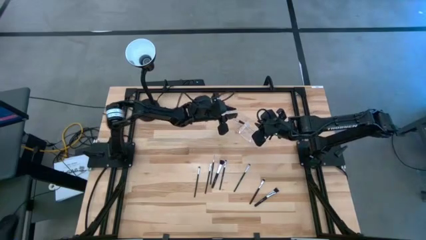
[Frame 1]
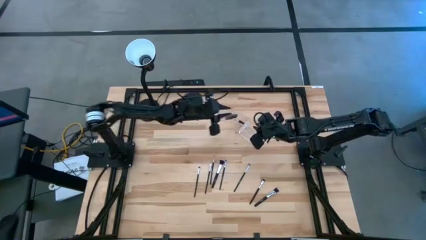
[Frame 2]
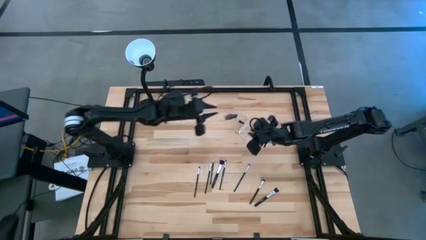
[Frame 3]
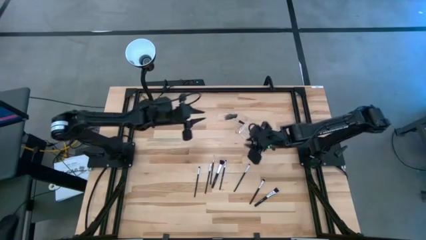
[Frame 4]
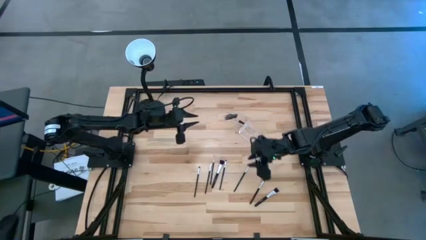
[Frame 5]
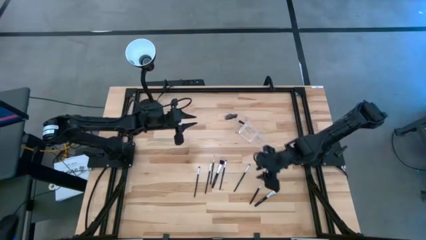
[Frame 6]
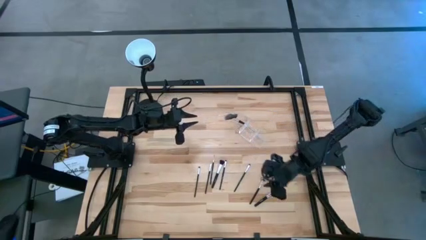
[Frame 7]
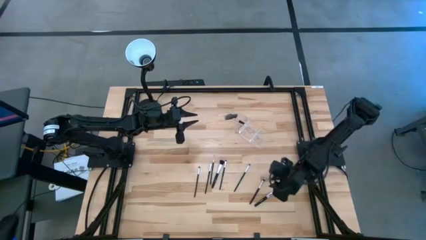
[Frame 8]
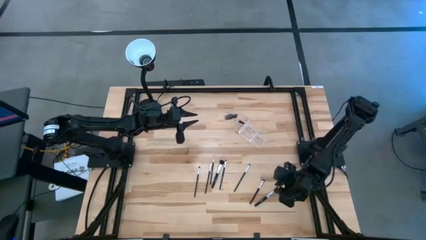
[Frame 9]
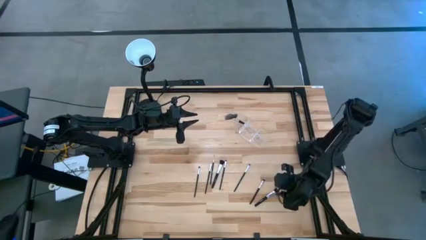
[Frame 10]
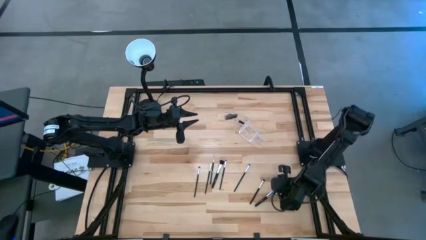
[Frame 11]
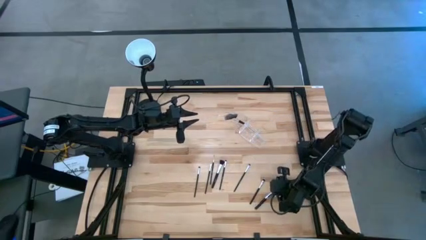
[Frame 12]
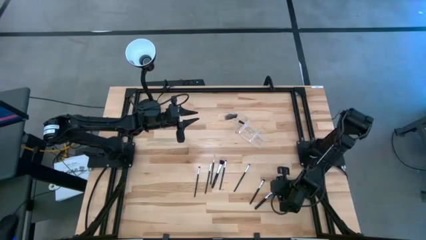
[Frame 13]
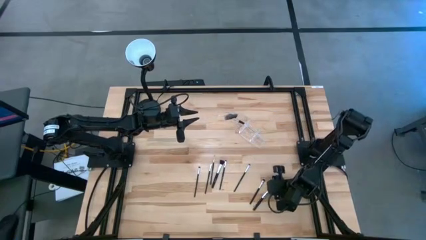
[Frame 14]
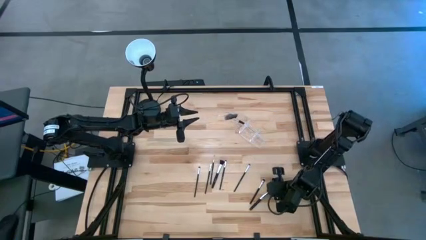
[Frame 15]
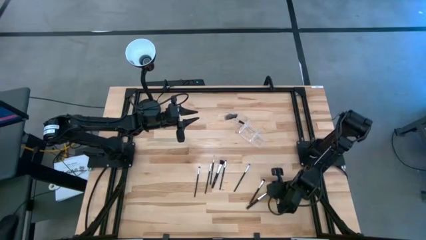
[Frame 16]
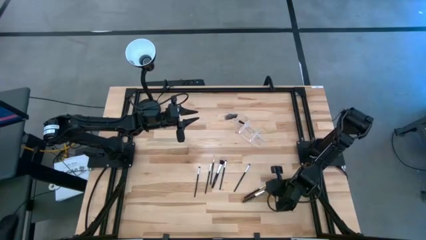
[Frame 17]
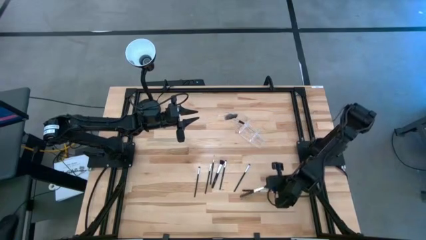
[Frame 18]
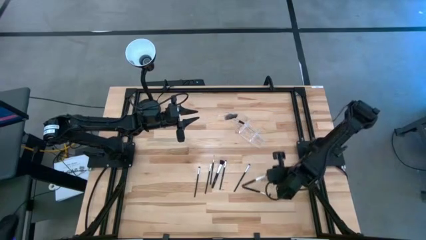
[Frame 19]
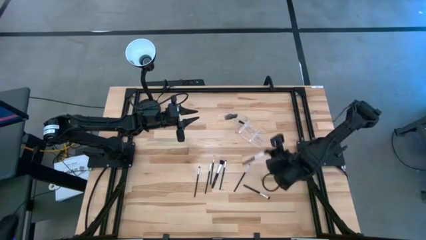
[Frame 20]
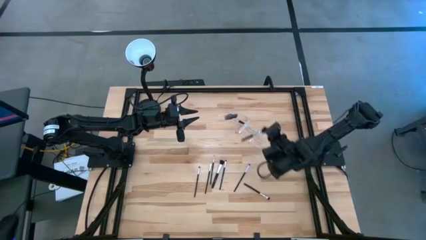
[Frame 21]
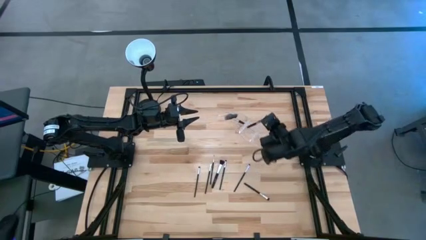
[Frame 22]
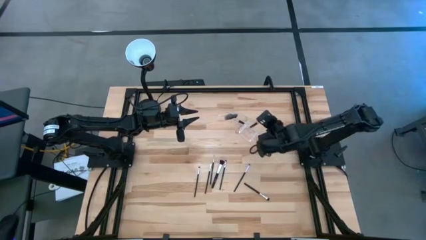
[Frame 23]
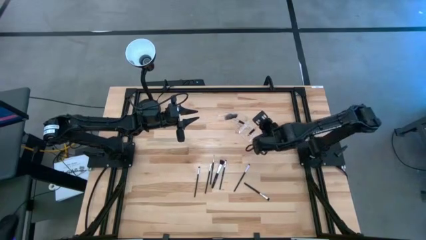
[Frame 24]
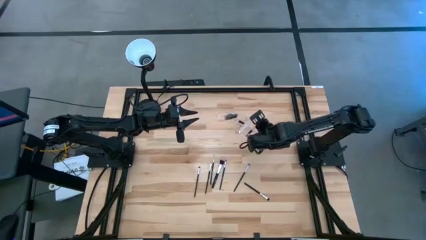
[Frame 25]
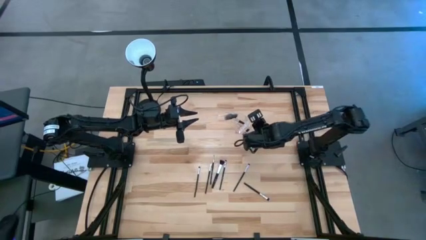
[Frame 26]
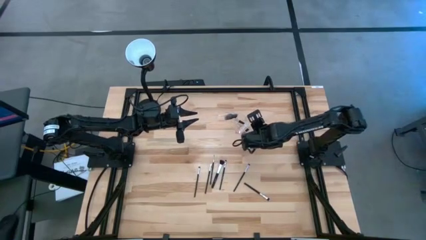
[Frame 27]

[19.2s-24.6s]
Task: Sort items
Put the blush brush into the middle of the transparent organizer

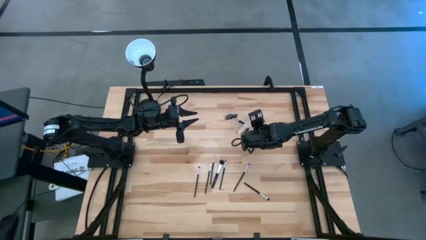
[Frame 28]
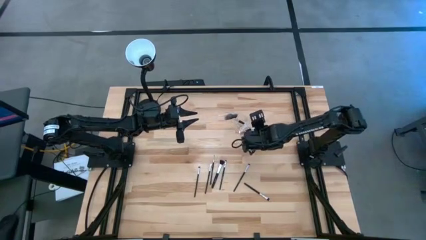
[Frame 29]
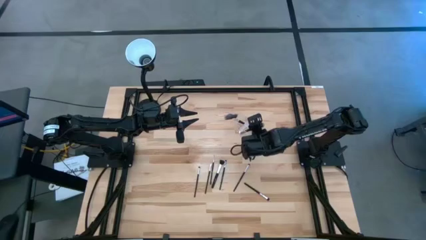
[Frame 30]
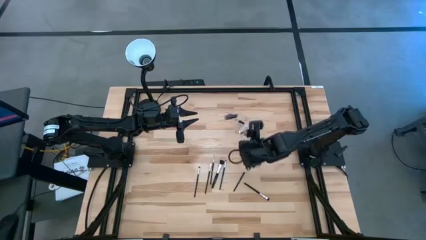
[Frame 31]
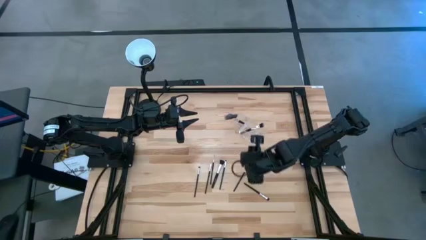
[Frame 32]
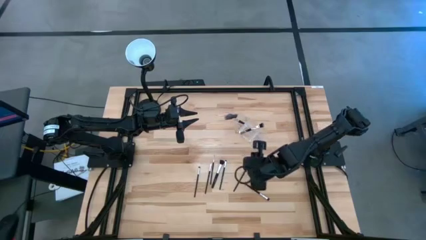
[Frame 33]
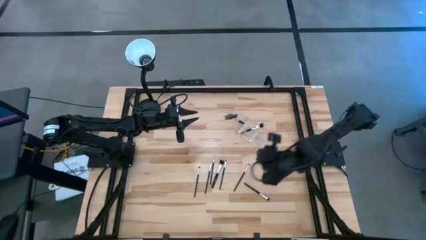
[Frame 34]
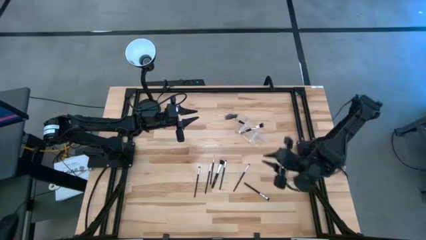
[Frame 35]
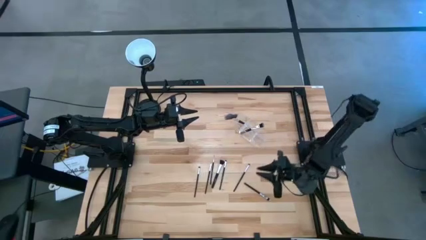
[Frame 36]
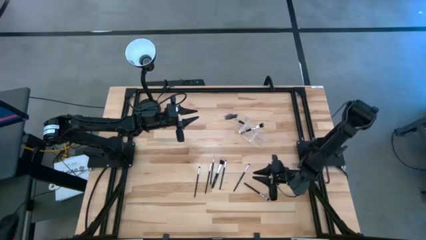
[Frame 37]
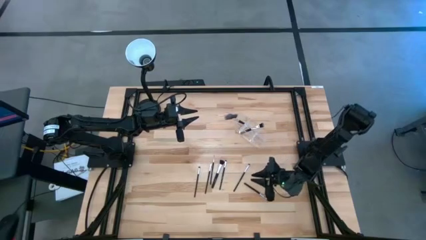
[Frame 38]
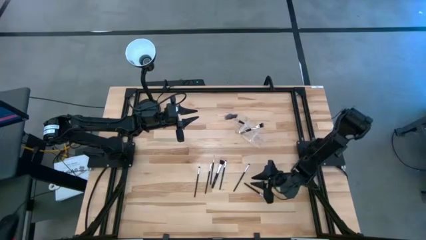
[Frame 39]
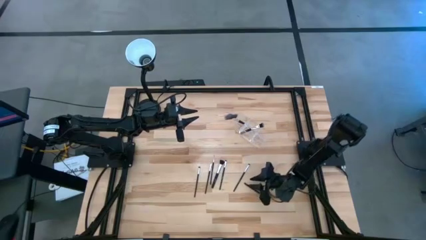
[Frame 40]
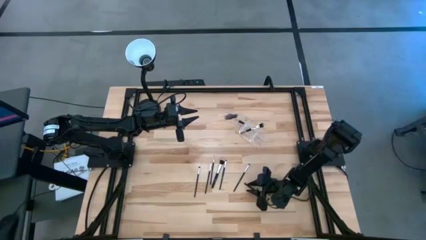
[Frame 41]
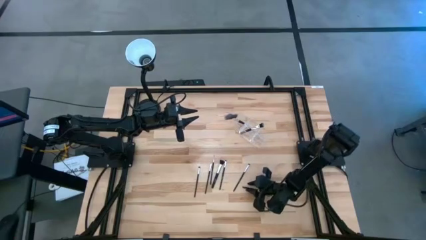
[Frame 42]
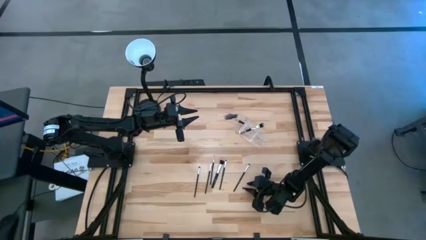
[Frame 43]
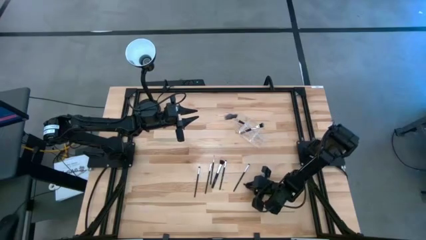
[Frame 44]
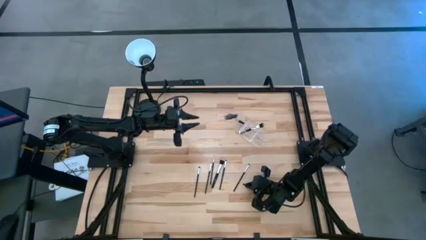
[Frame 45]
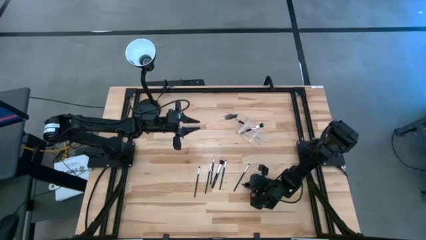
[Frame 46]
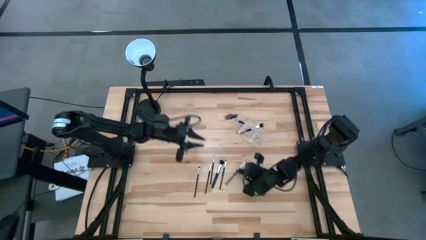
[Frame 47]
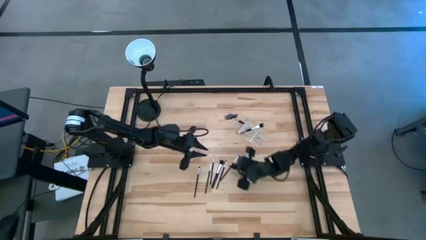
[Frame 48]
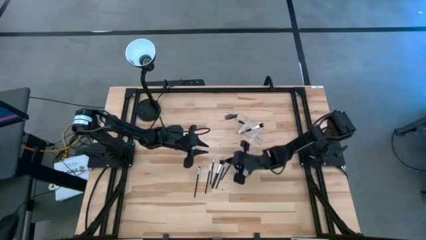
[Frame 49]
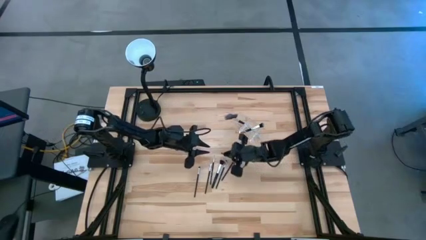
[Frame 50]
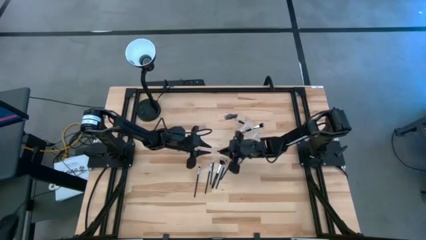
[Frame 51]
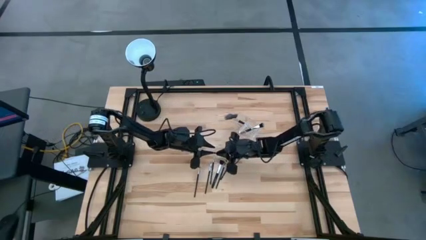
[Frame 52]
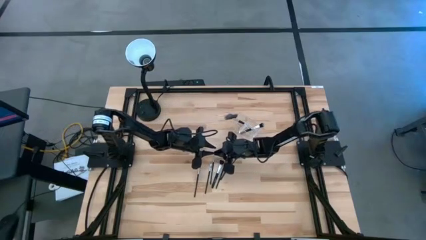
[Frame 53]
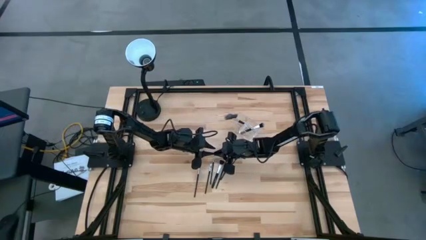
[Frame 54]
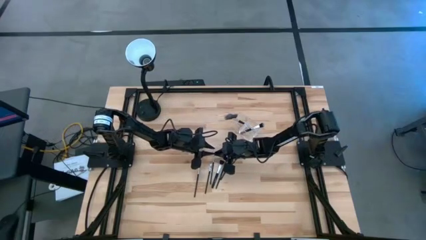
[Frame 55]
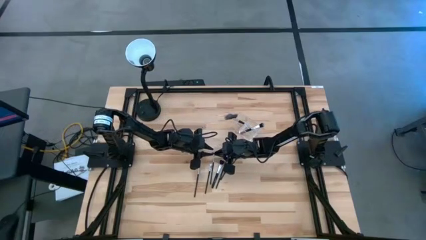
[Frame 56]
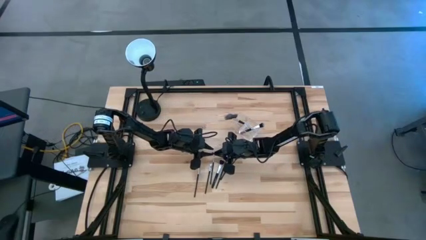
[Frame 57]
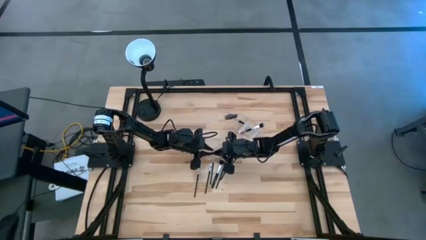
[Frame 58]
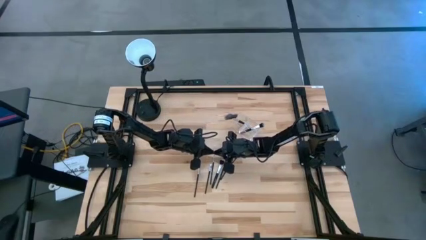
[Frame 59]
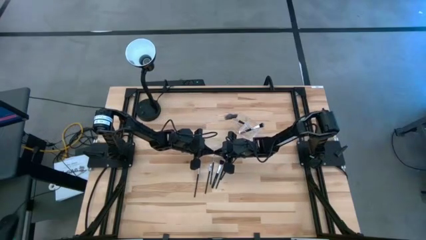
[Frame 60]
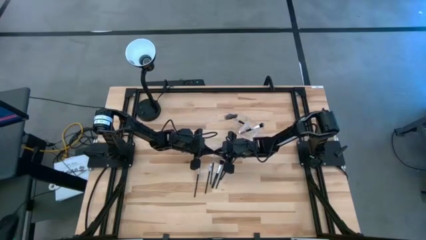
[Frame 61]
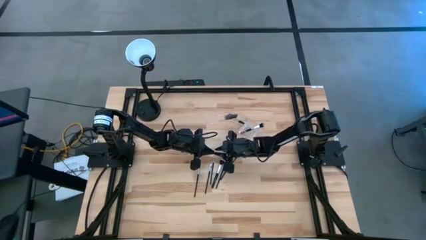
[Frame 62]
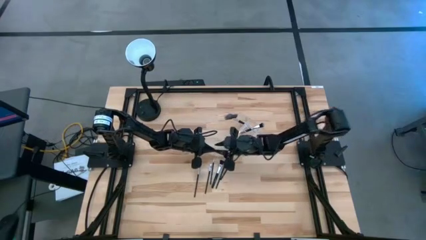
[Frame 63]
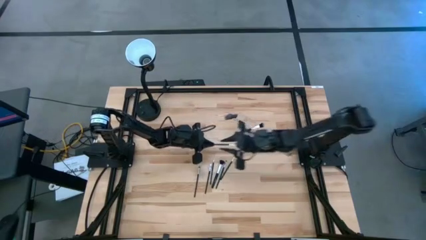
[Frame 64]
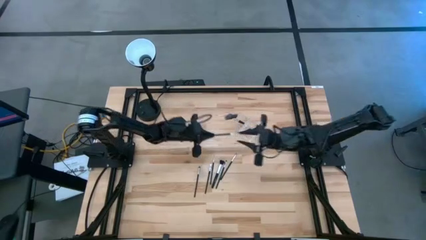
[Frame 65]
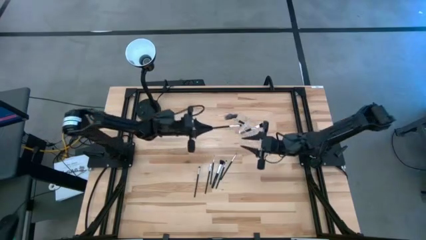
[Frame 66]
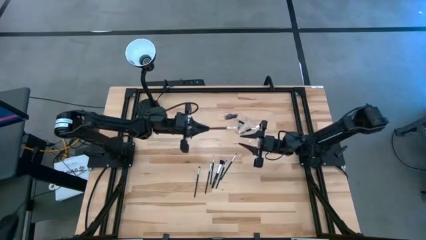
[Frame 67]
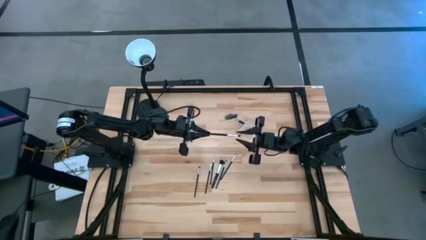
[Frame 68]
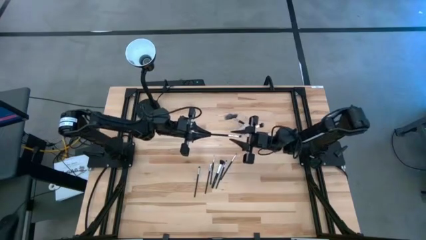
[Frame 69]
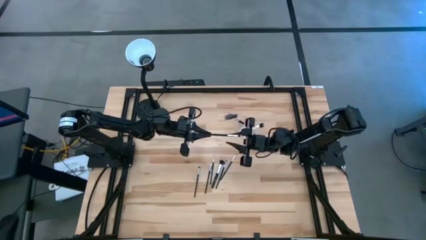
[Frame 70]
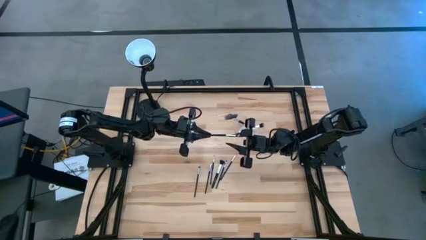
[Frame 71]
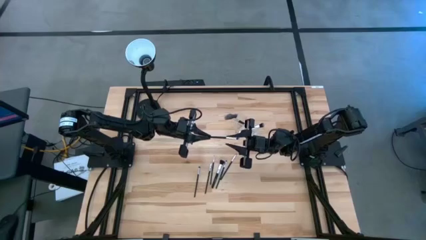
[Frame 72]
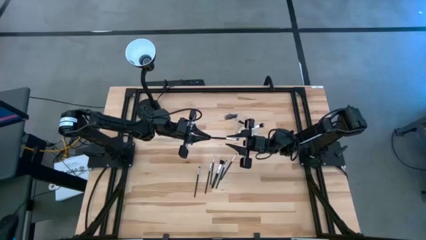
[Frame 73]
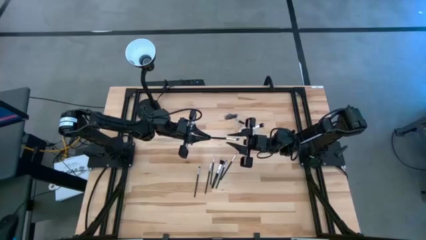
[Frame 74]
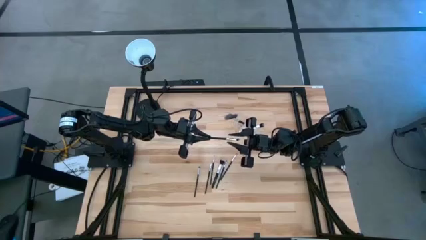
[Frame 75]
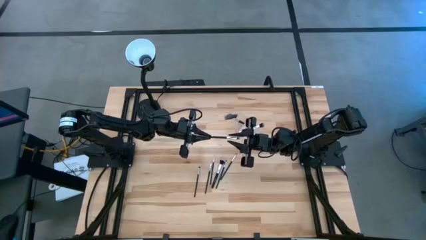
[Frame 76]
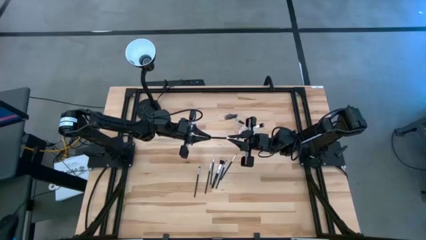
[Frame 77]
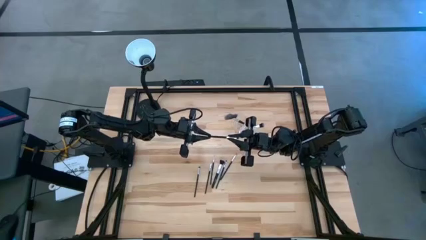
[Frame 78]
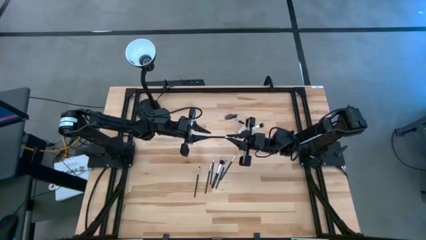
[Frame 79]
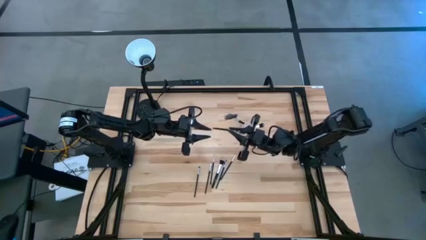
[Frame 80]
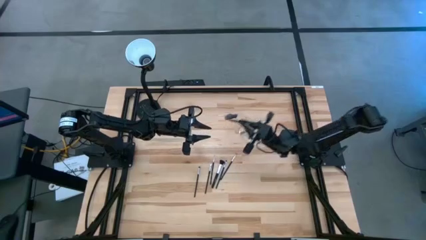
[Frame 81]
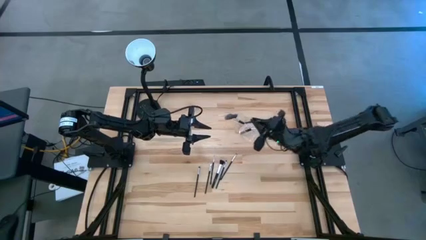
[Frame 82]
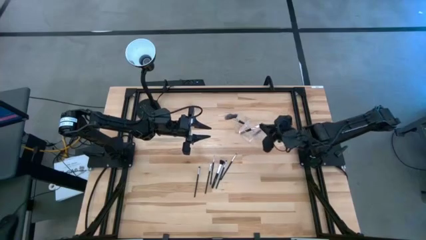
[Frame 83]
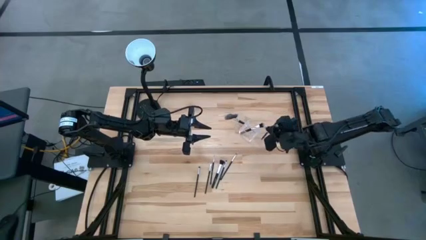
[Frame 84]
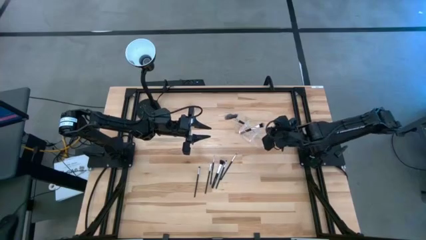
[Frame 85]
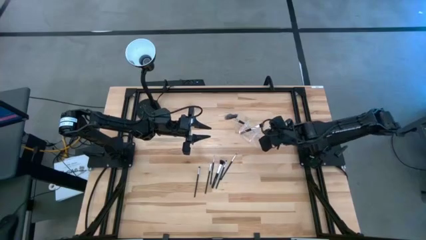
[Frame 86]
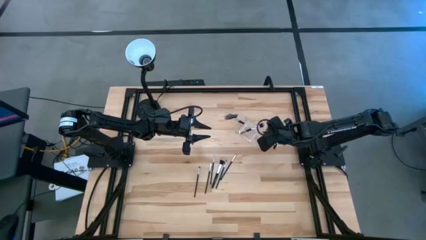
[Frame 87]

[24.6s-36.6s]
Put the eyeshadow brush into the right side of the transparent organizer
